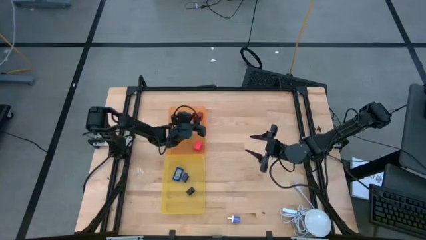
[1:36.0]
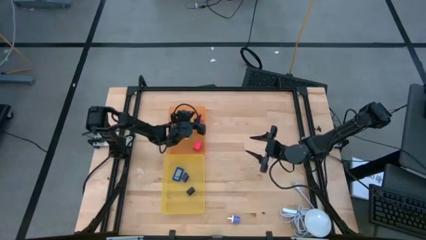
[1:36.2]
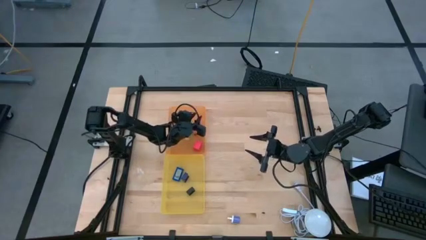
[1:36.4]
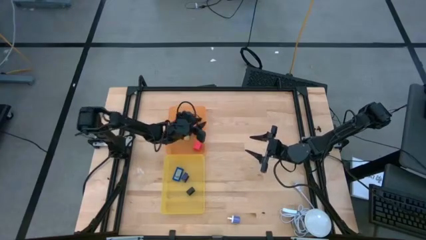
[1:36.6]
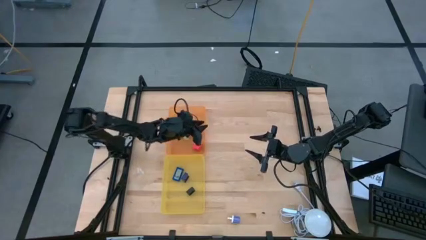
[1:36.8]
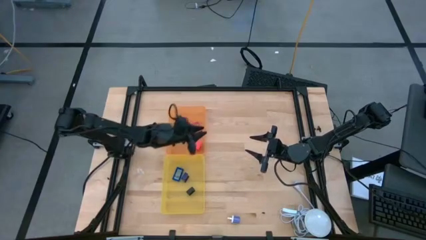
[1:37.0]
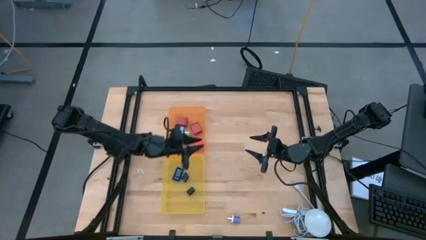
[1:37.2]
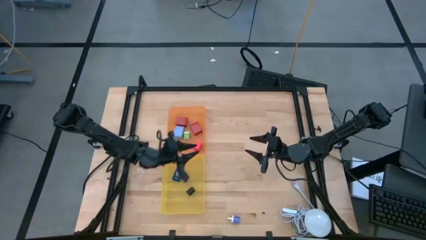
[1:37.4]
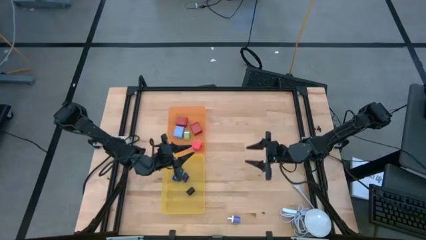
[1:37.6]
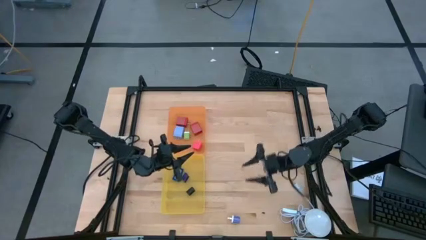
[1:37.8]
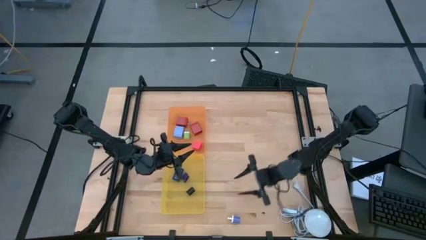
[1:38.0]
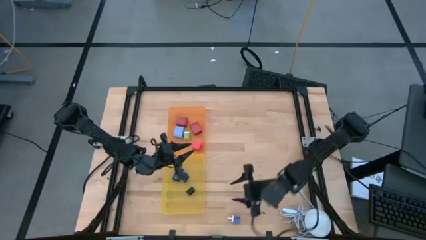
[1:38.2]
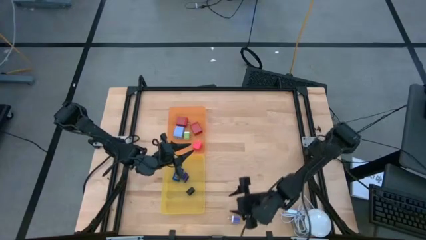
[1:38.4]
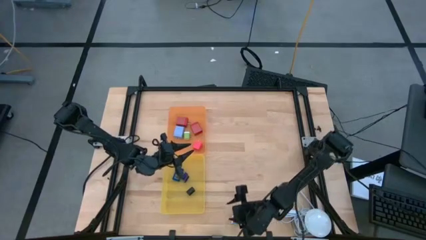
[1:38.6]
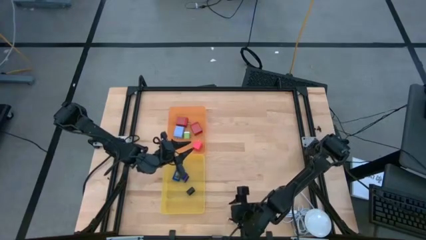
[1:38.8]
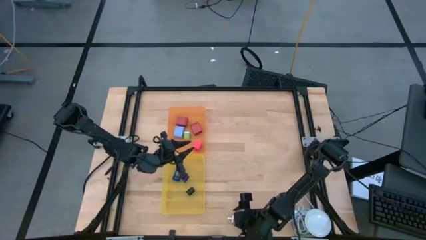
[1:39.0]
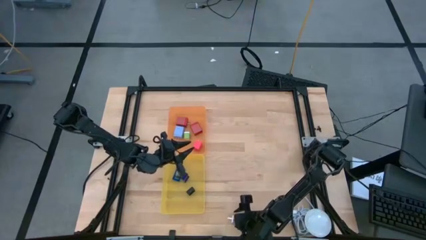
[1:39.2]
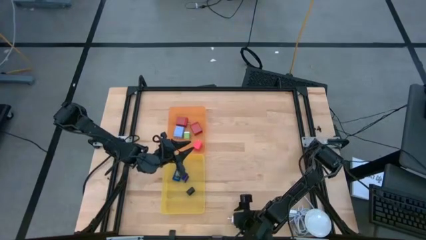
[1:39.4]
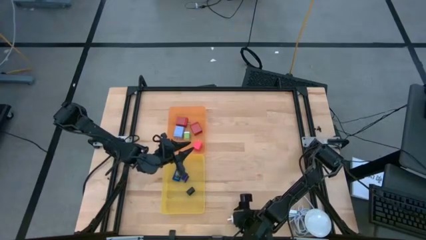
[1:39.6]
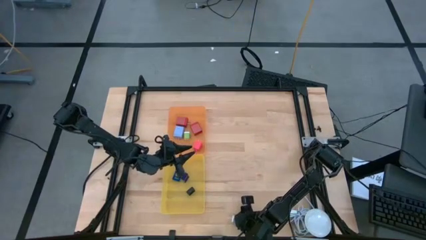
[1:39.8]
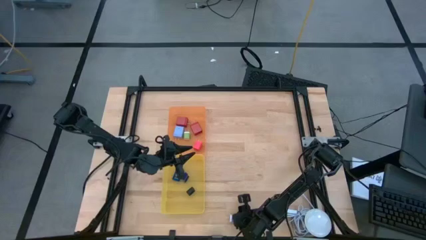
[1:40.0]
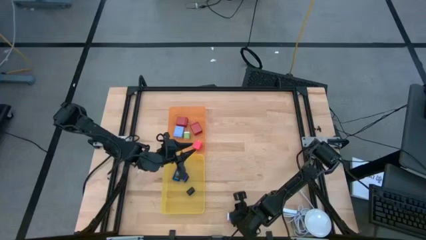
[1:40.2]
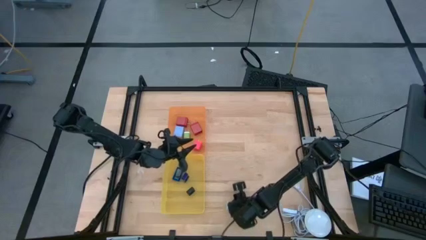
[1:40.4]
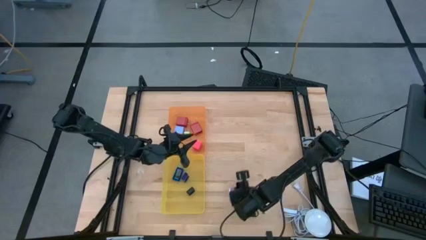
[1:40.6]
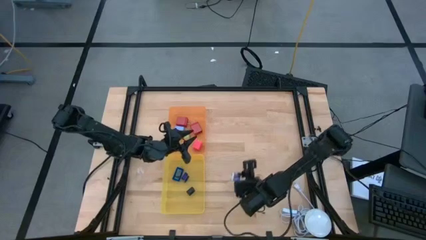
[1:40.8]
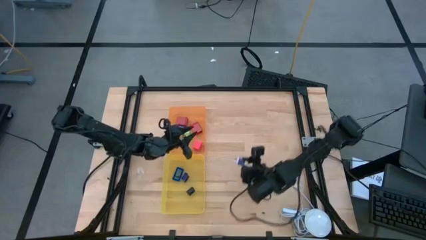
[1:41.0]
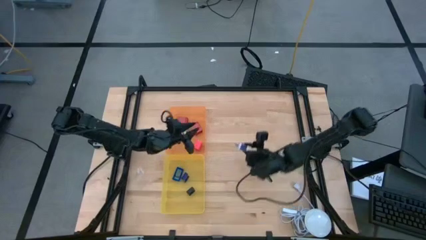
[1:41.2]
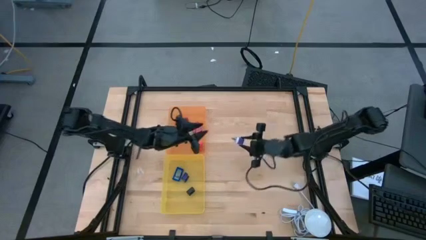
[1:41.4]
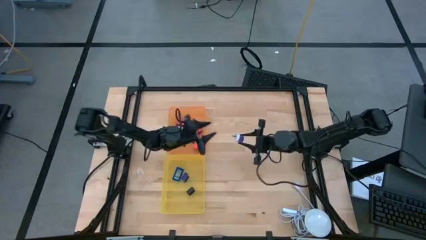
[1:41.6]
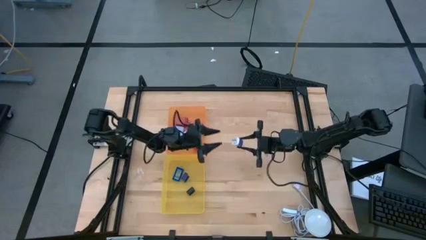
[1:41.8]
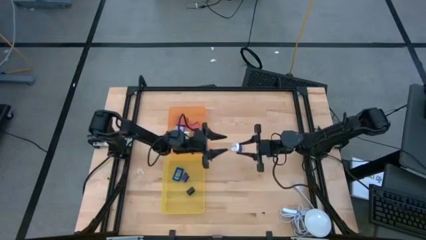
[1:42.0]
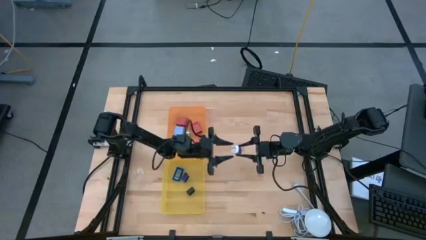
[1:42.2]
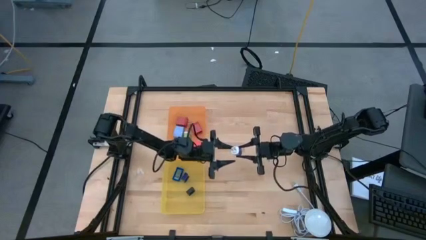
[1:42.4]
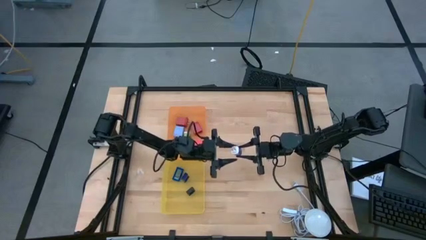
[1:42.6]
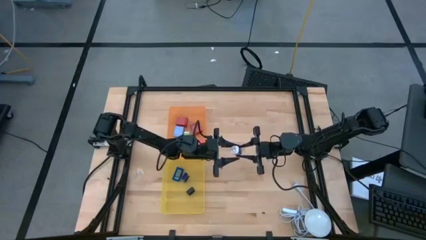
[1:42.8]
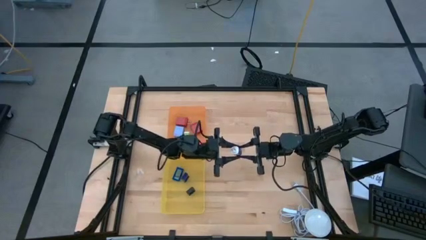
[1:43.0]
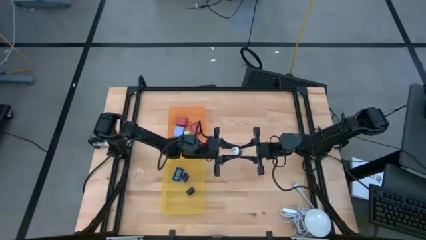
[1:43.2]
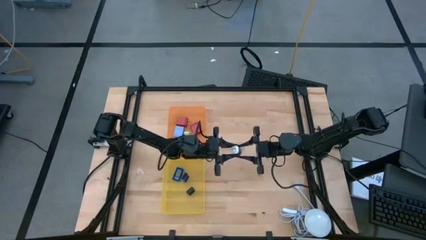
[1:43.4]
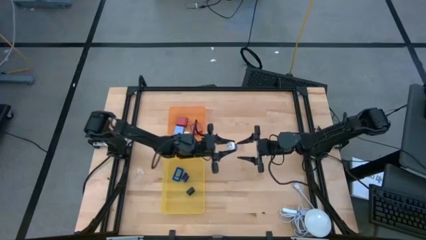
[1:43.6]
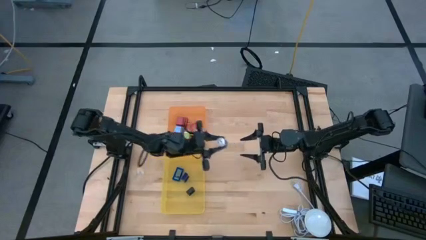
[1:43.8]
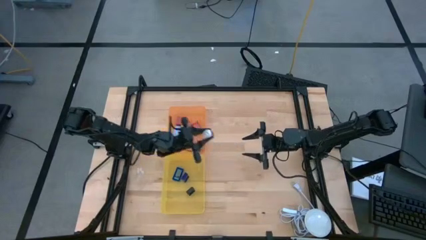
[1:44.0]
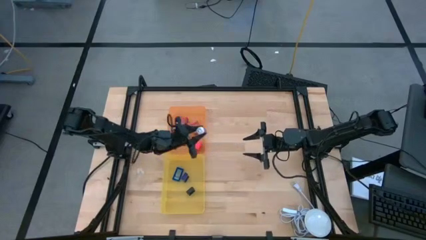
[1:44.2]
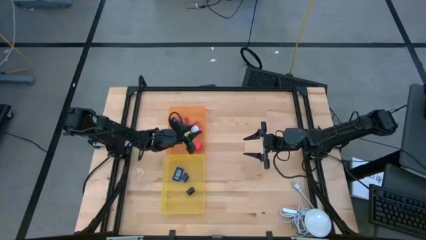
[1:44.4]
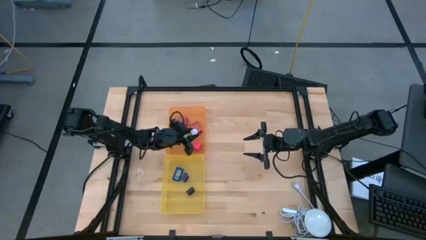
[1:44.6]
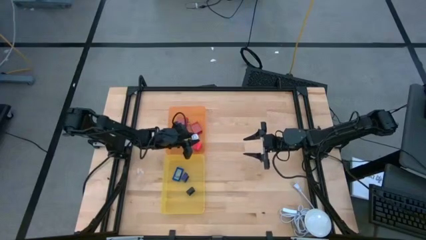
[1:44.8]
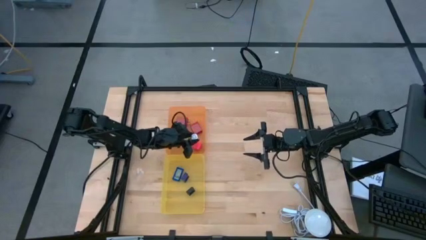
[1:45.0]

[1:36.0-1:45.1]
Task: Sort adapters and digital timers
Put the violet adapter into the orange bin

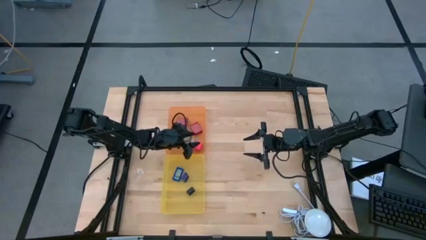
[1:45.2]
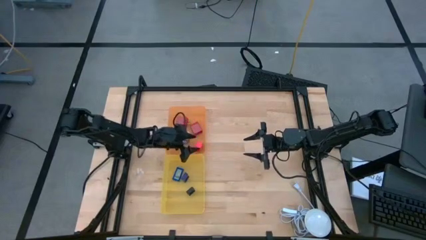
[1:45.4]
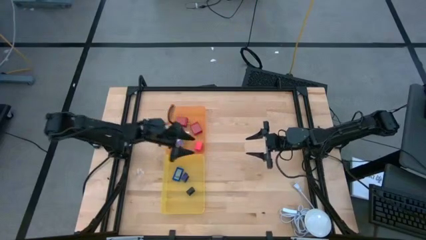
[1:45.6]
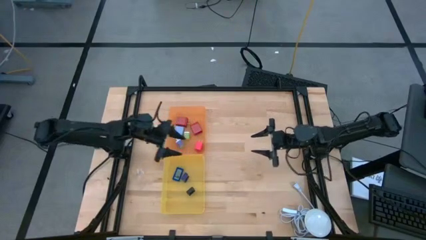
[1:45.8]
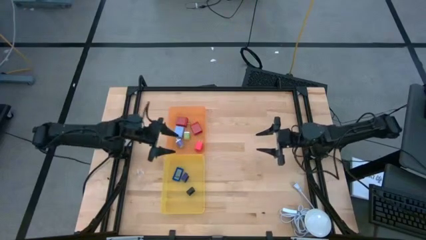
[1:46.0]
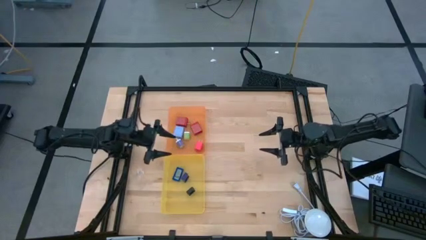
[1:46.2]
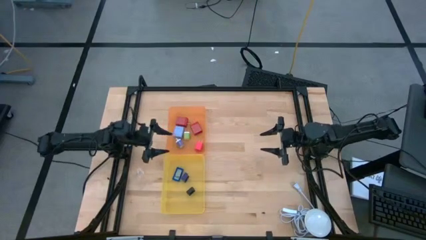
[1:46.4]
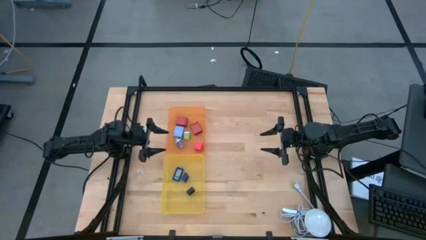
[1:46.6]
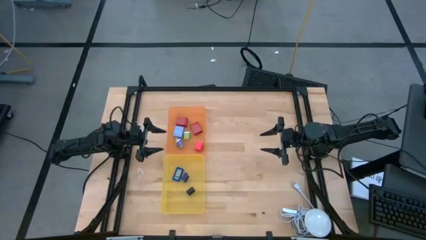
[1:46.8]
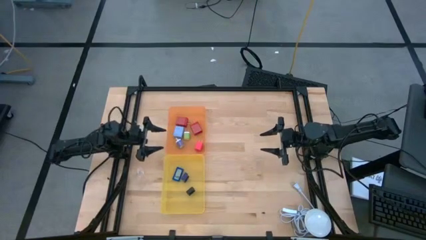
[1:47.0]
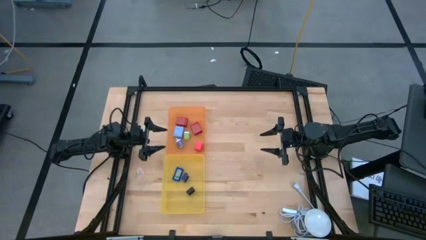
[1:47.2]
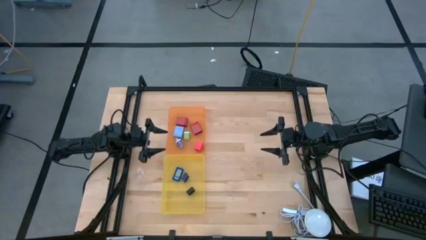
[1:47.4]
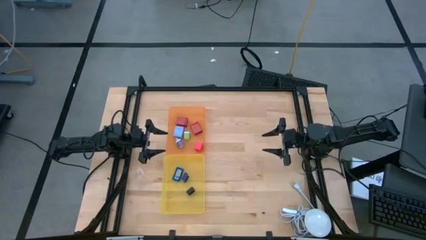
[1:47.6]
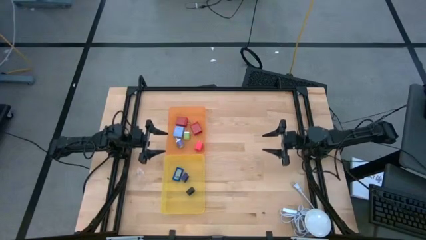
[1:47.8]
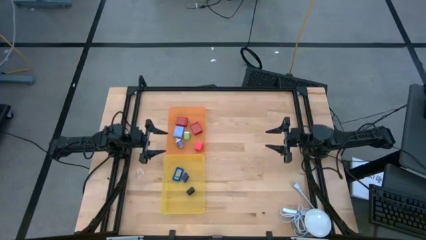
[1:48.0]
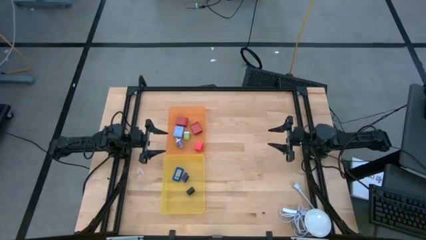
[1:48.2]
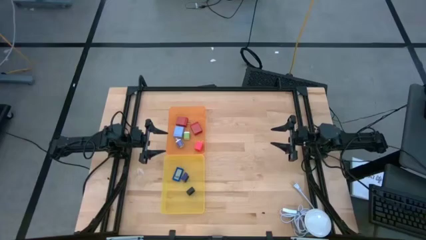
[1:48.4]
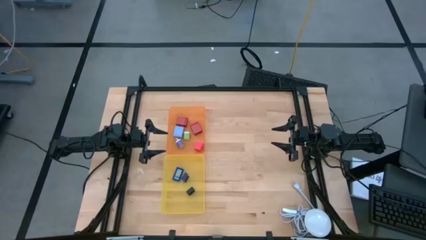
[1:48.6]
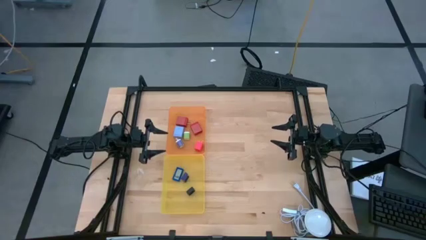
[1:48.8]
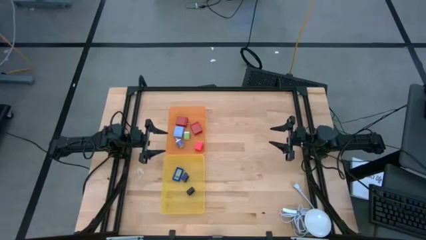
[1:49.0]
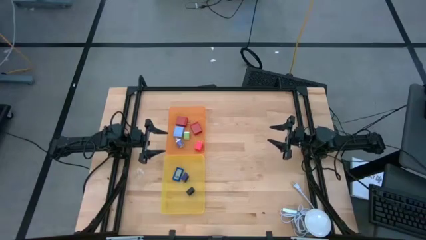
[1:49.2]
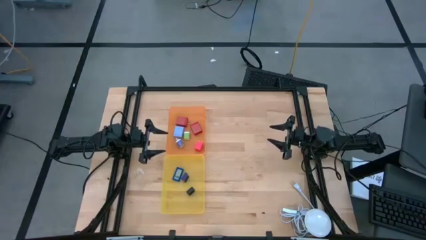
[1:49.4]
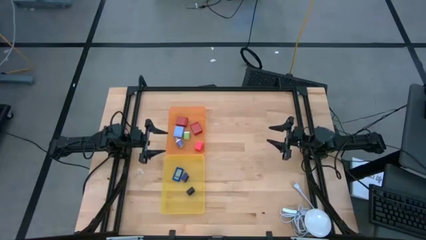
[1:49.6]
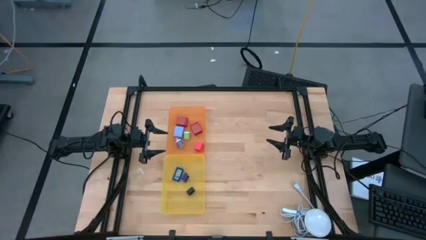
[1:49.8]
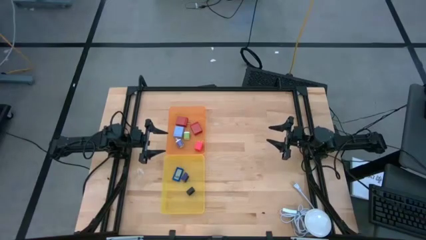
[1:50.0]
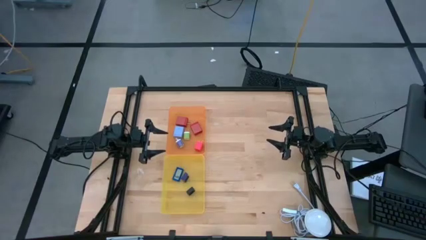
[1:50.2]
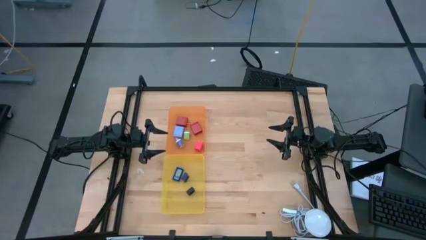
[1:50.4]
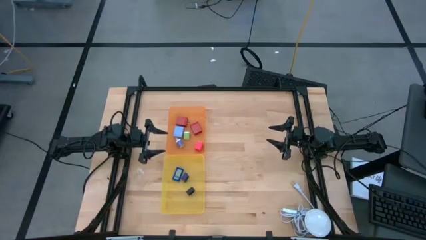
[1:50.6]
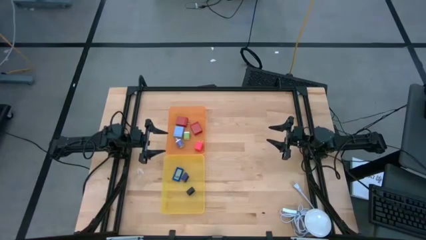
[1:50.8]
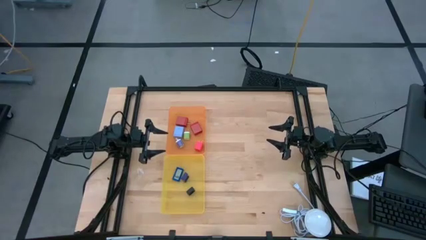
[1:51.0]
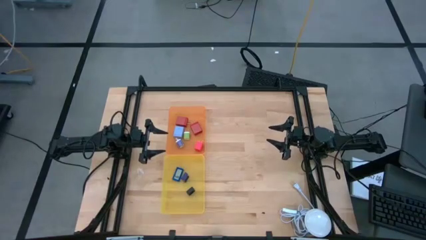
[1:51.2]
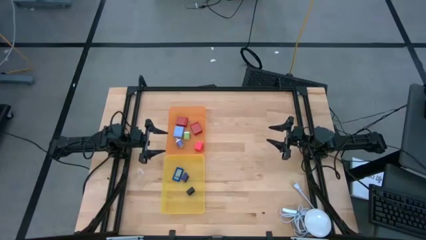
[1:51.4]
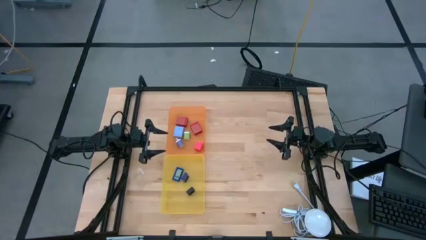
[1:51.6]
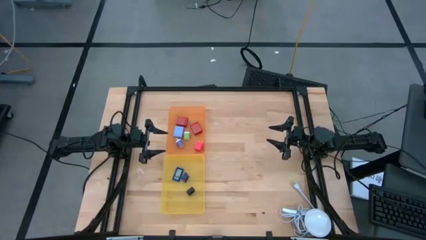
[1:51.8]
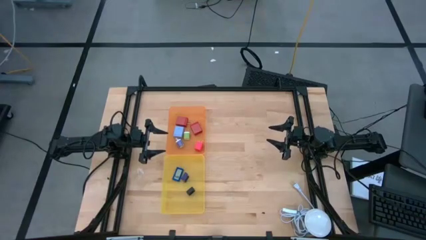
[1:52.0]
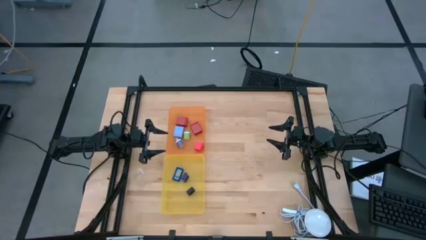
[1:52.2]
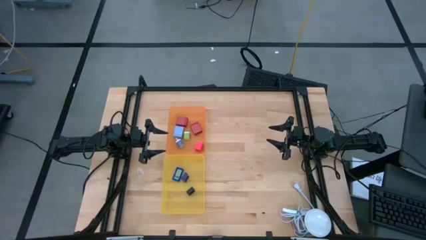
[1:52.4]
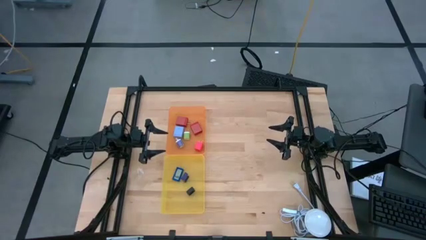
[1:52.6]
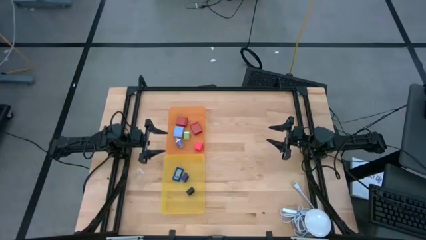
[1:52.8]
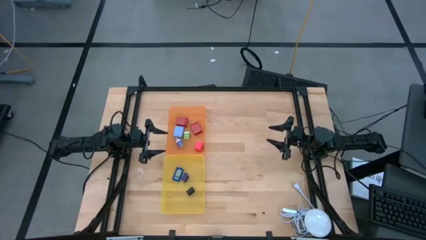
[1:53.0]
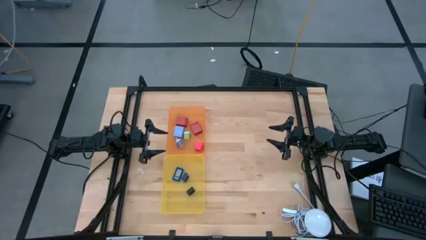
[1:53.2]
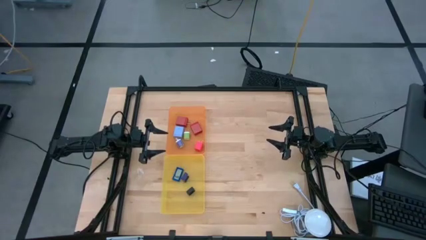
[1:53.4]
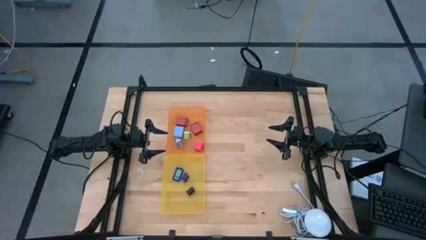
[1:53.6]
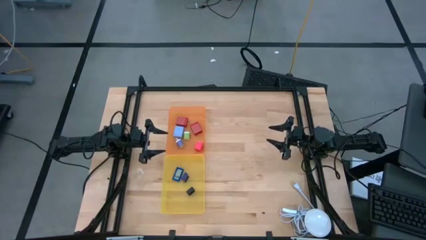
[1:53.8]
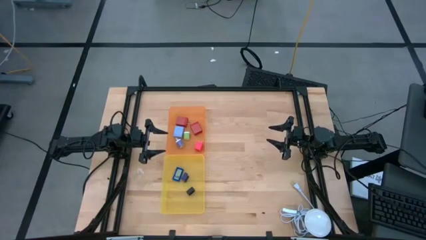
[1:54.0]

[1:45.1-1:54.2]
Return to Home Position
